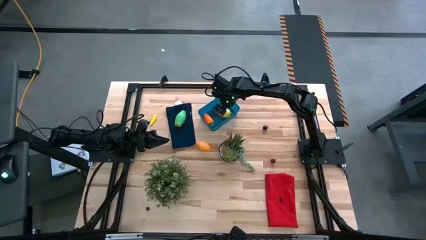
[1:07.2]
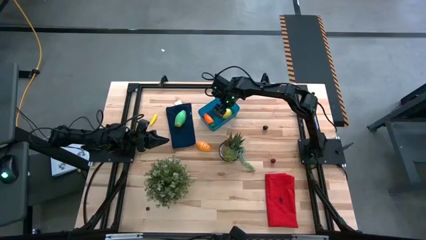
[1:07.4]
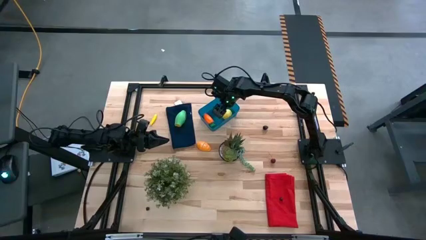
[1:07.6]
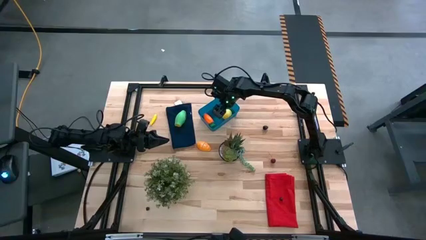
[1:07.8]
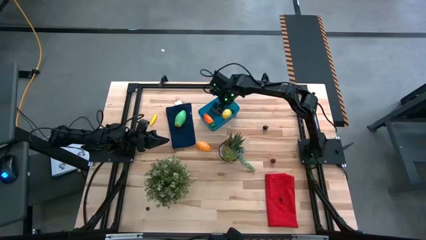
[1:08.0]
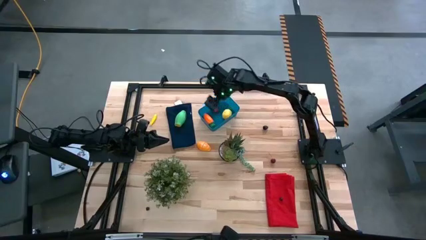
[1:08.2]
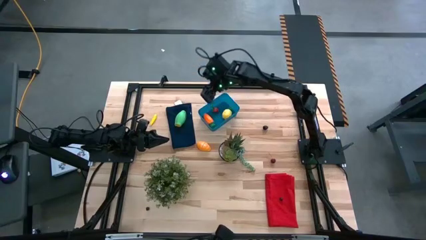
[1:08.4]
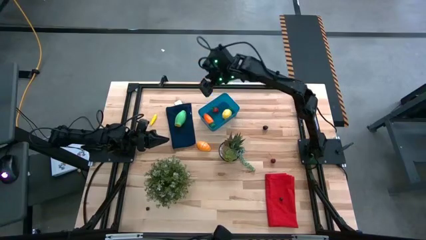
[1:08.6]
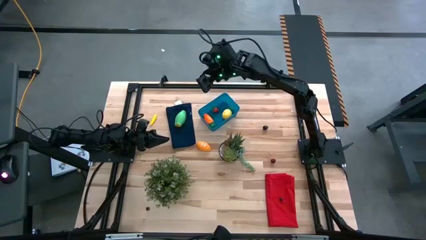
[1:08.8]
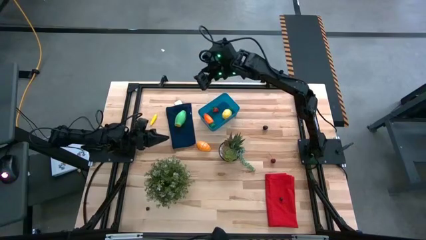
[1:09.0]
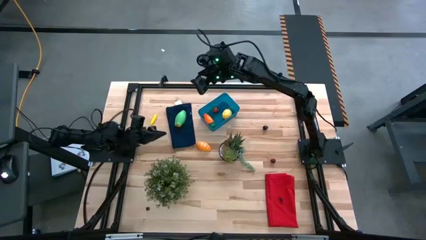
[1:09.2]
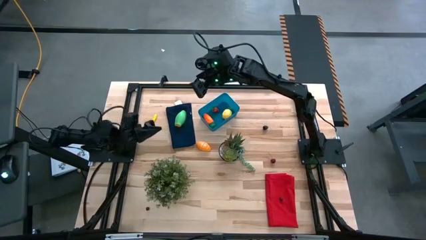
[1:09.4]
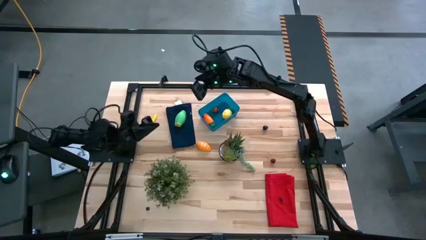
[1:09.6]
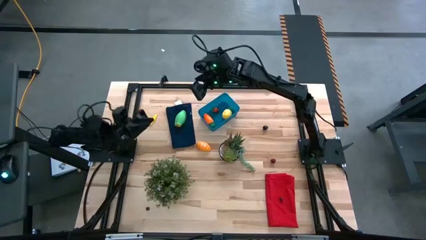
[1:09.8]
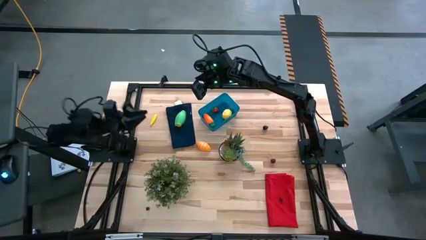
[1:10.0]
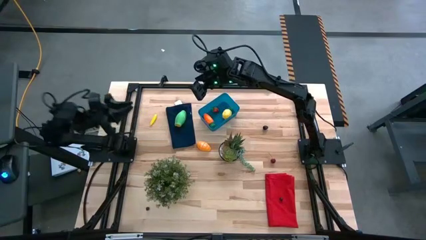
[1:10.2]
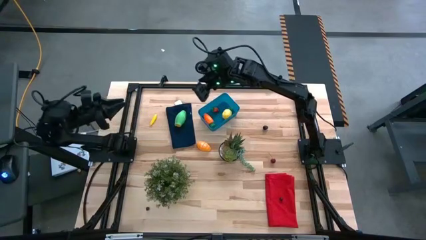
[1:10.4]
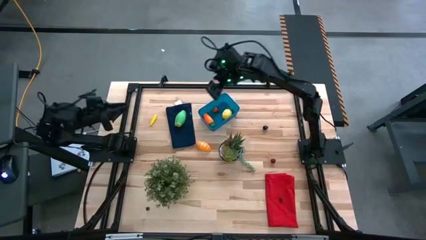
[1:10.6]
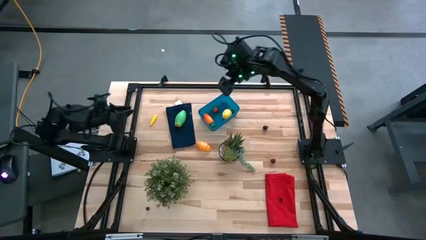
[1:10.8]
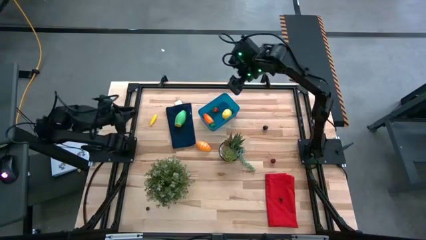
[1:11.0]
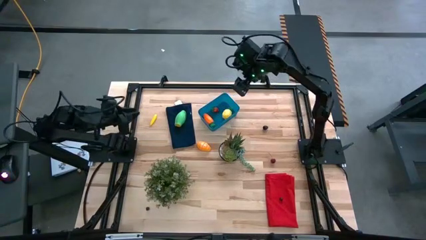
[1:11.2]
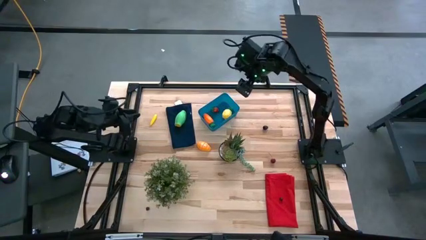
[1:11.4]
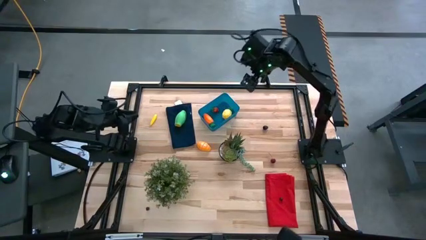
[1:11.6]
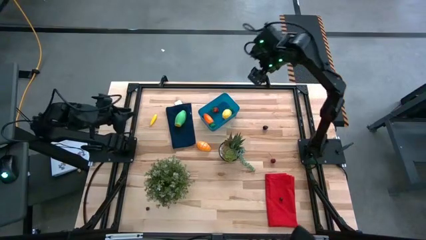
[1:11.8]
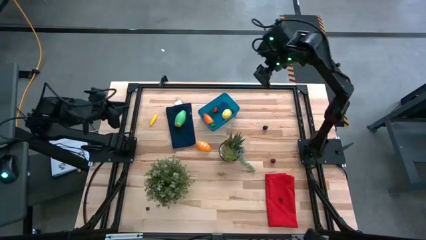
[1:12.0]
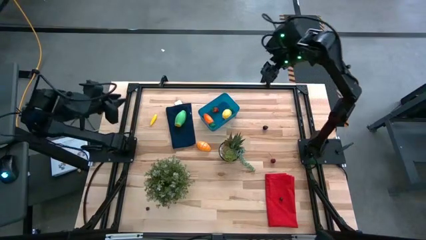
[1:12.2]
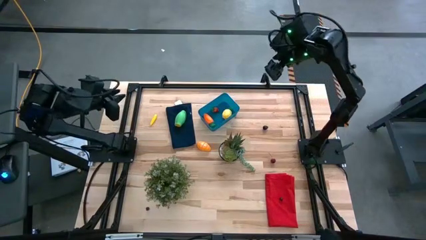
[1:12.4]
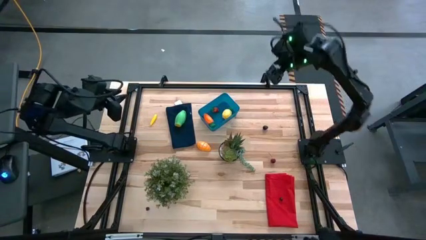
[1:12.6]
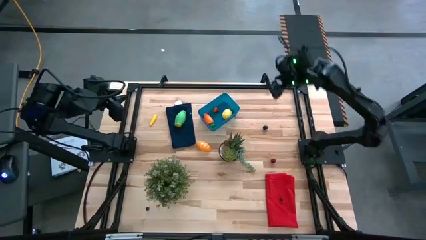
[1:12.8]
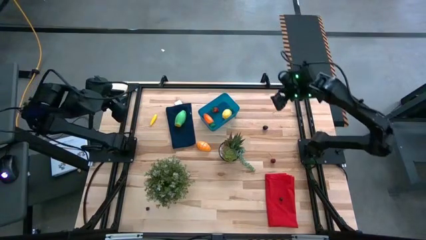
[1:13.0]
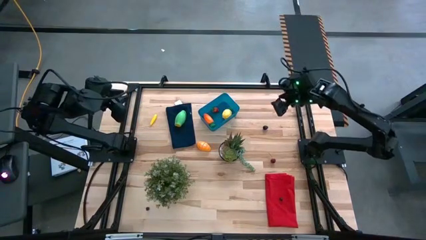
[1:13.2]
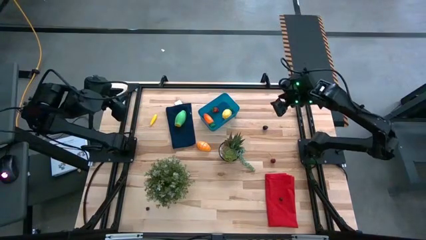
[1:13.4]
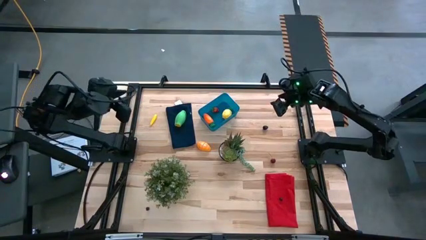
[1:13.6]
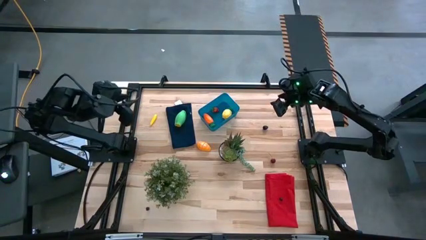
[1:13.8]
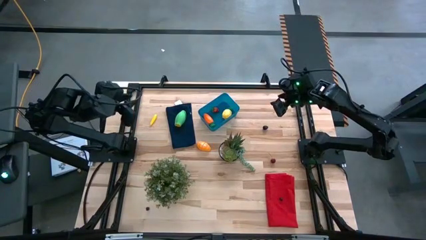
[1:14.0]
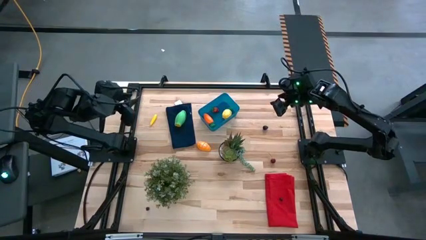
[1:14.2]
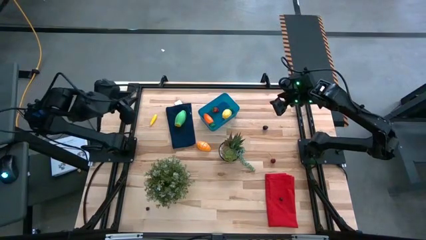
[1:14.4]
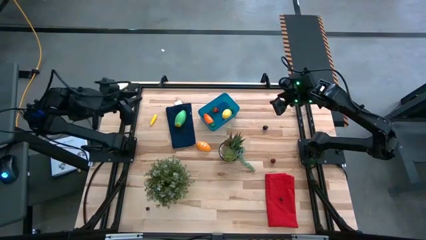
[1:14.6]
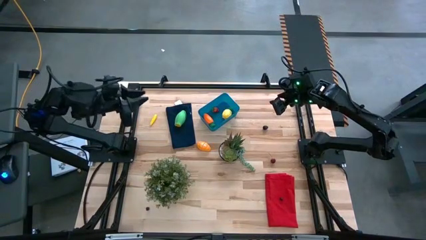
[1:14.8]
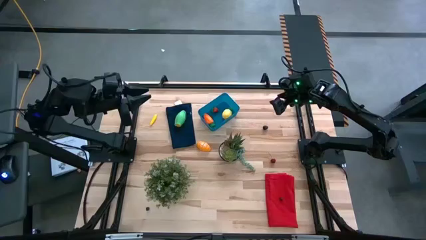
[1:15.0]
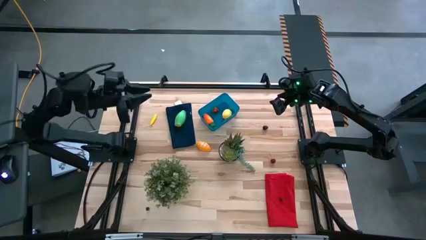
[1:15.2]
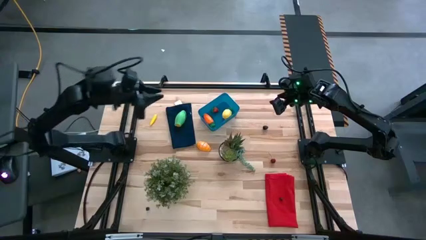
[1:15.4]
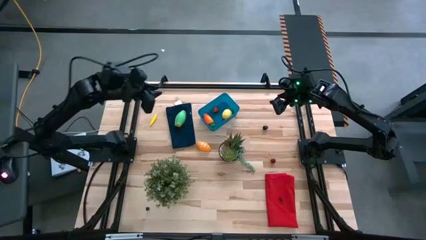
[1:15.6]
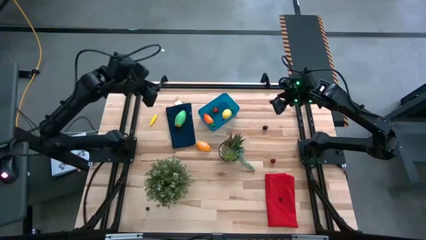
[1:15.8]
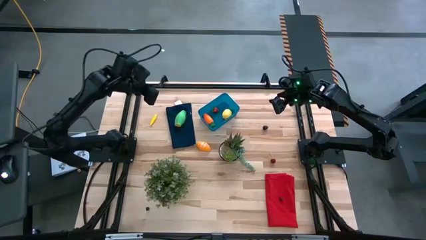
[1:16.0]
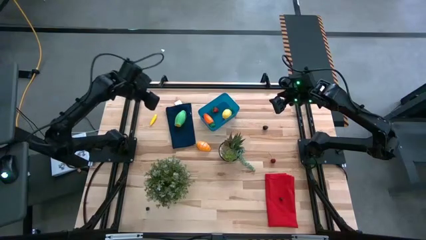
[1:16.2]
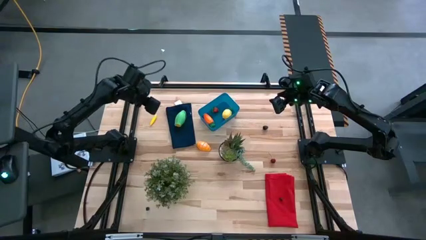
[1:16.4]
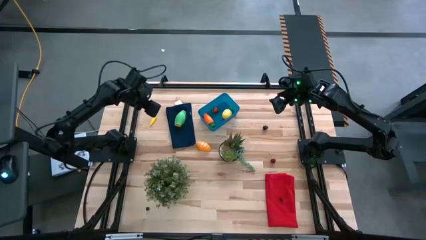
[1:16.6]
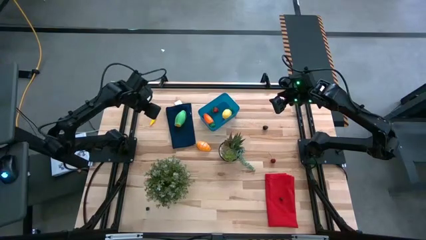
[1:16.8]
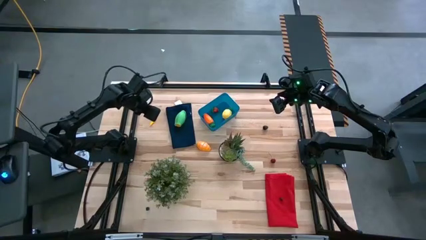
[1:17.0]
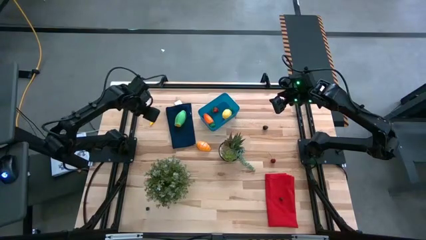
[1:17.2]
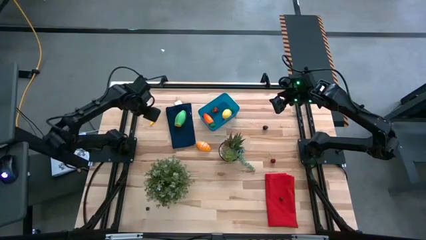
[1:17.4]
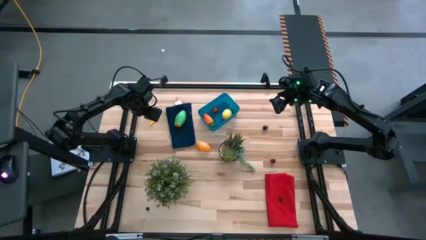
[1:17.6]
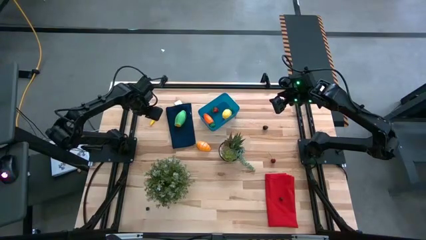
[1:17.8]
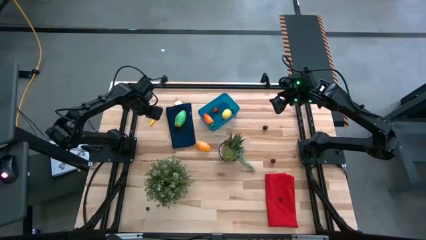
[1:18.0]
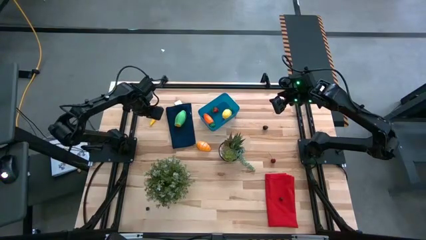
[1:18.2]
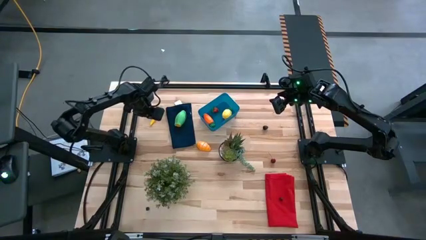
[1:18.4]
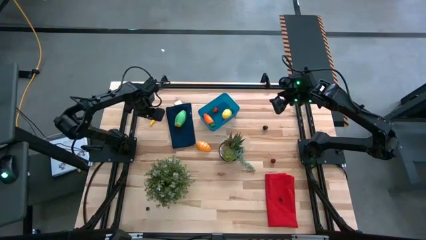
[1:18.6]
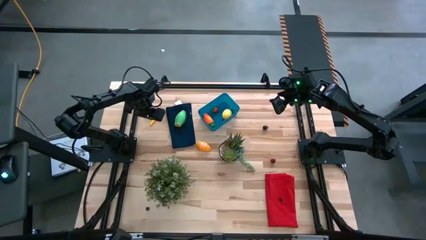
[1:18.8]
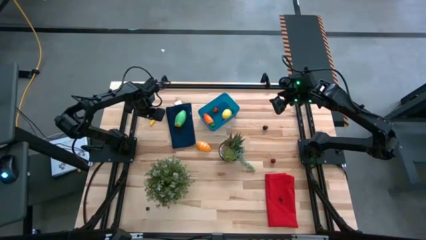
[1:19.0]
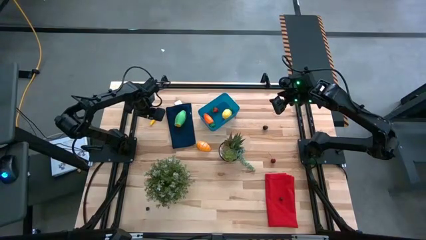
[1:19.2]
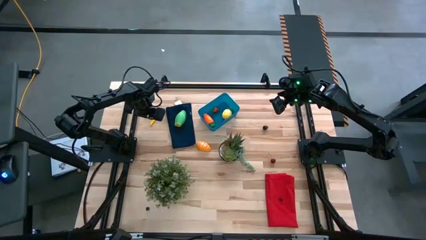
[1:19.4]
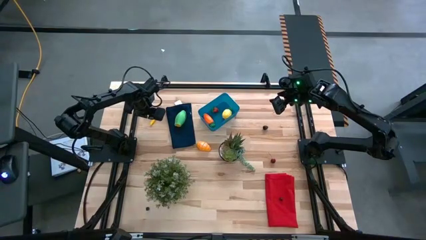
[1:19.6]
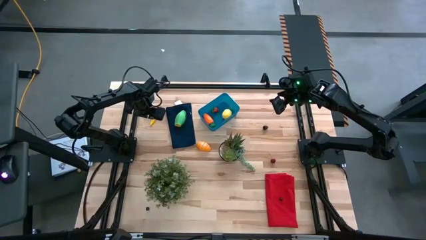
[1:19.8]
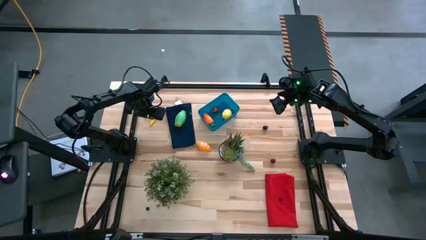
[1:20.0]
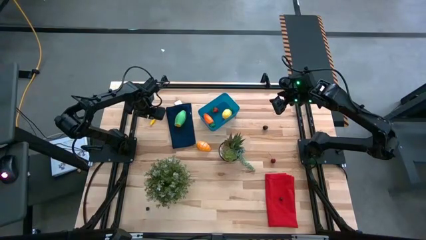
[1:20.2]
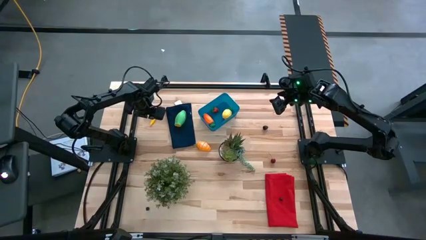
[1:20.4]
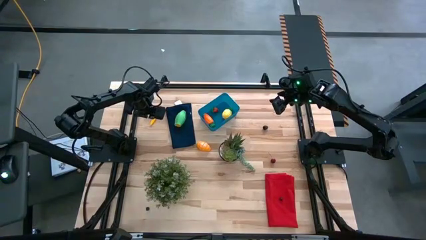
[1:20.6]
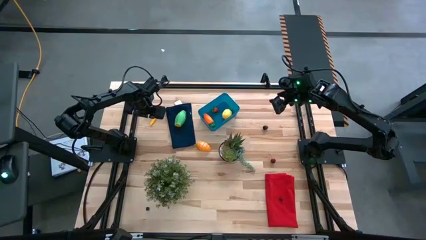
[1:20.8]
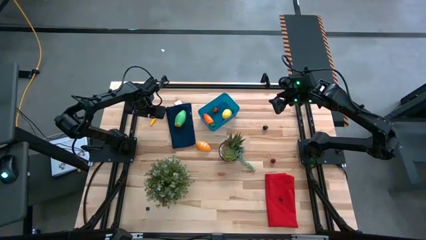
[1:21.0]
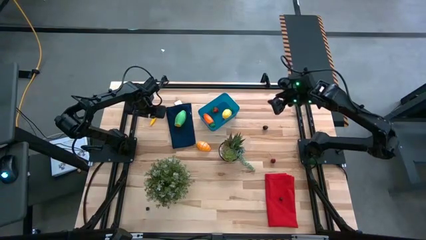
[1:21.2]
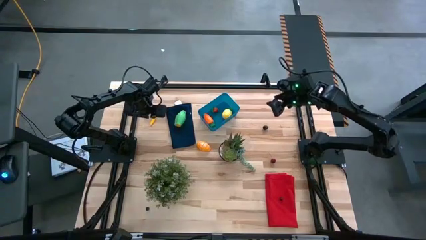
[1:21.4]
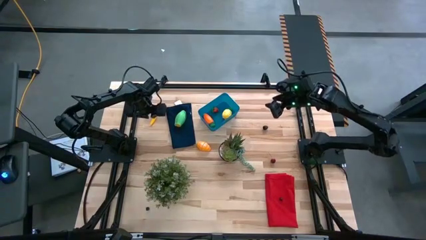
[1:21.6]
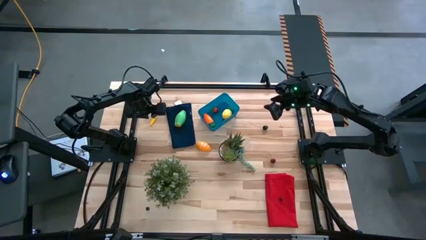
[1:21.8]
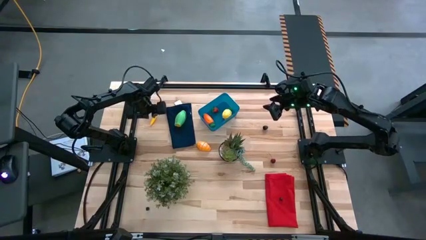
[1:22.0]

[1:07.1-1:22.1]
Task: Pick and placing Produce into tupperware
Put the yellow corn into the blue bin
